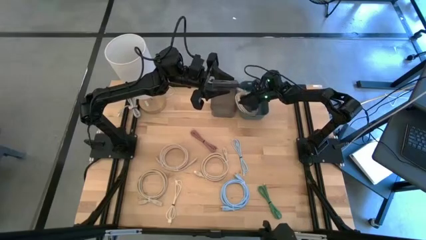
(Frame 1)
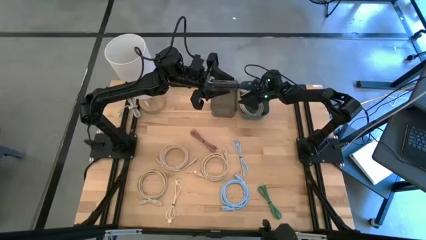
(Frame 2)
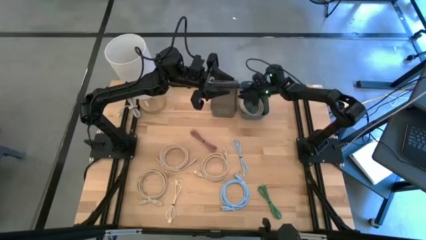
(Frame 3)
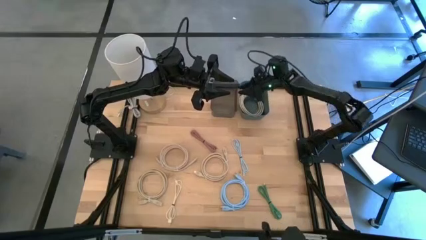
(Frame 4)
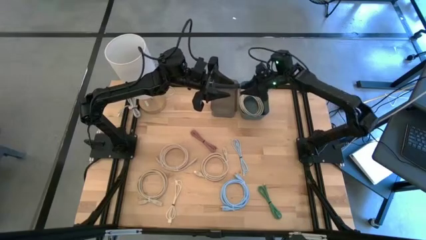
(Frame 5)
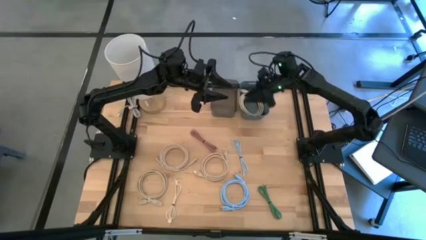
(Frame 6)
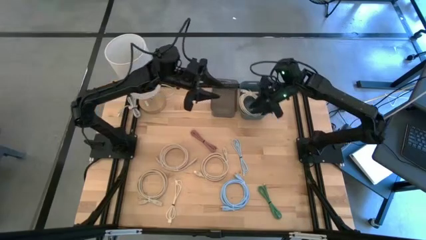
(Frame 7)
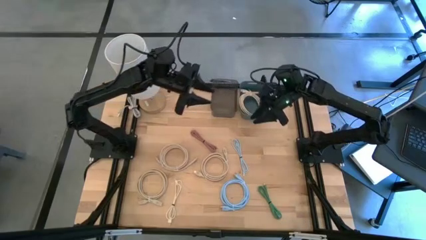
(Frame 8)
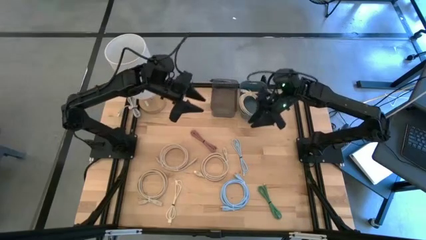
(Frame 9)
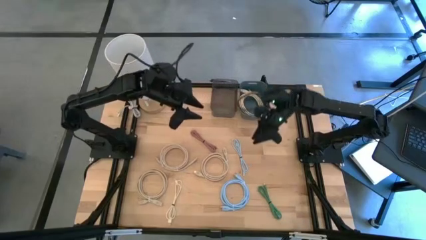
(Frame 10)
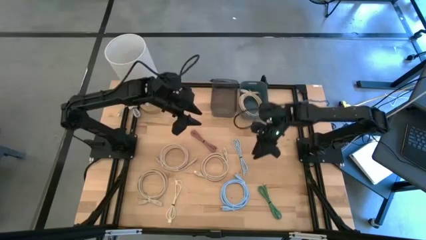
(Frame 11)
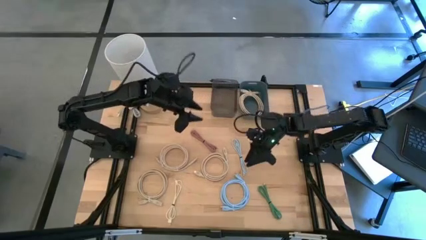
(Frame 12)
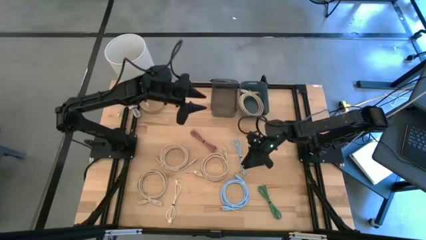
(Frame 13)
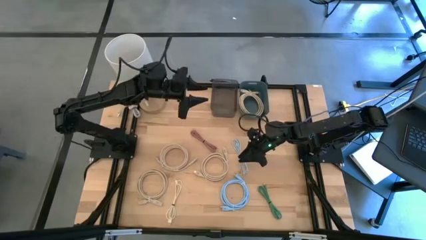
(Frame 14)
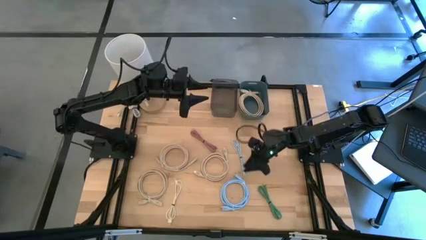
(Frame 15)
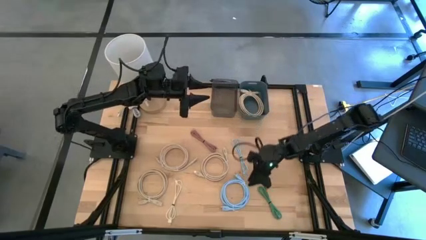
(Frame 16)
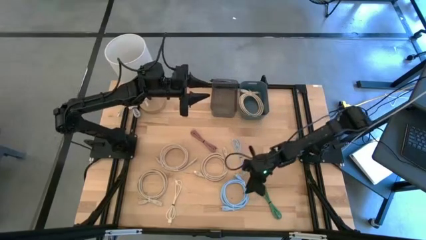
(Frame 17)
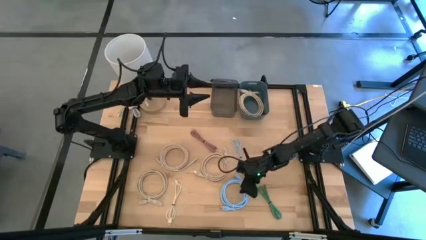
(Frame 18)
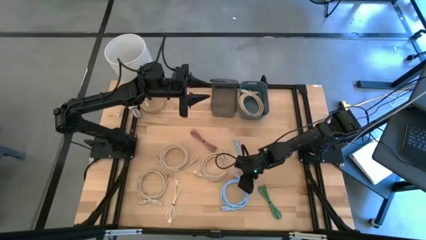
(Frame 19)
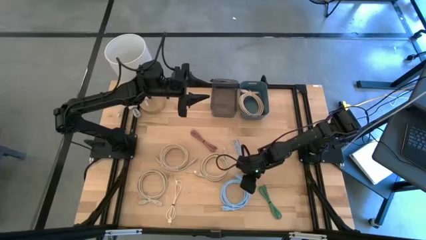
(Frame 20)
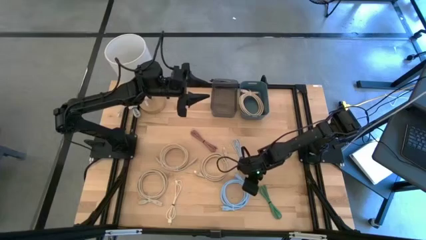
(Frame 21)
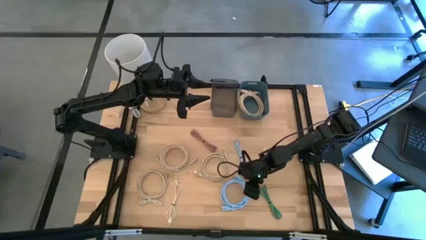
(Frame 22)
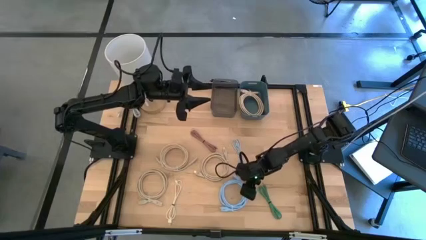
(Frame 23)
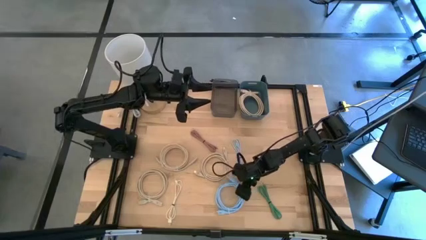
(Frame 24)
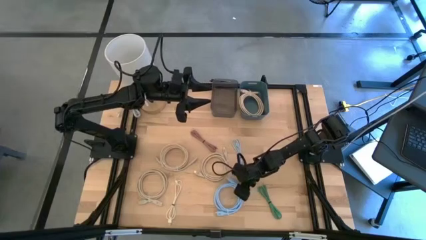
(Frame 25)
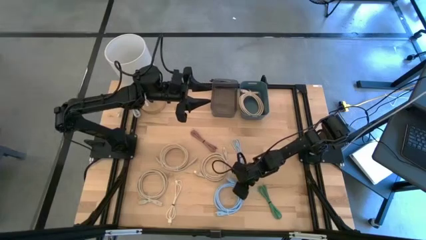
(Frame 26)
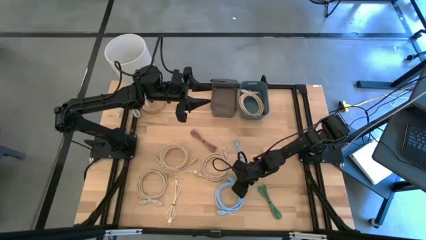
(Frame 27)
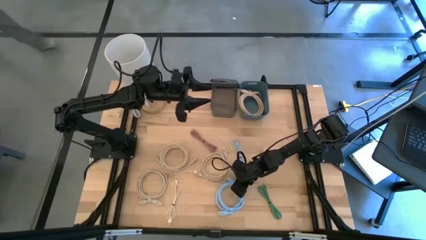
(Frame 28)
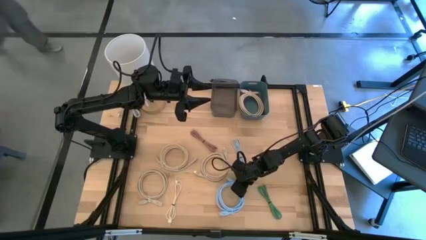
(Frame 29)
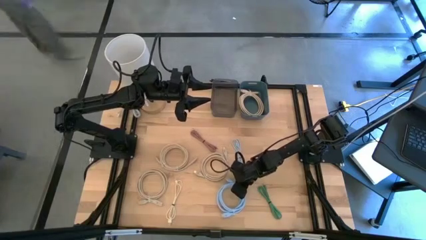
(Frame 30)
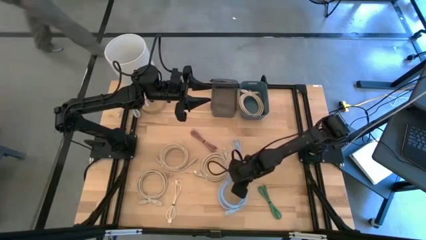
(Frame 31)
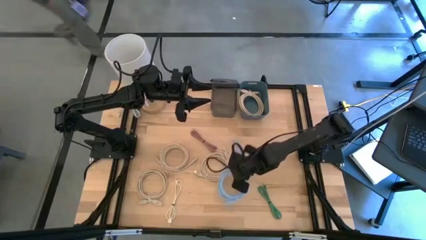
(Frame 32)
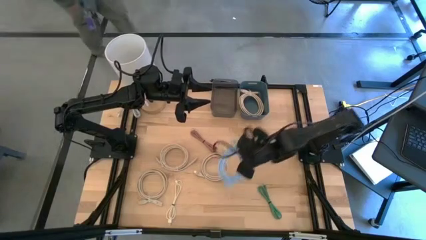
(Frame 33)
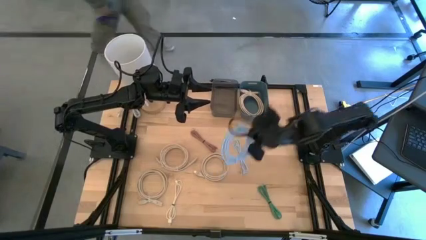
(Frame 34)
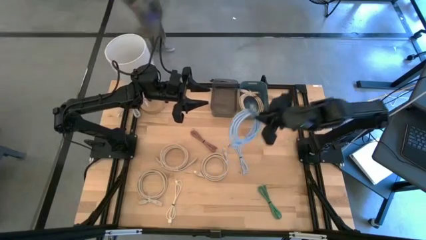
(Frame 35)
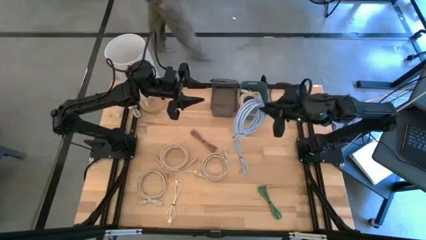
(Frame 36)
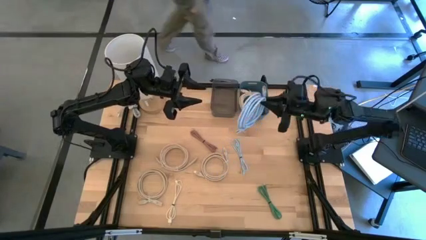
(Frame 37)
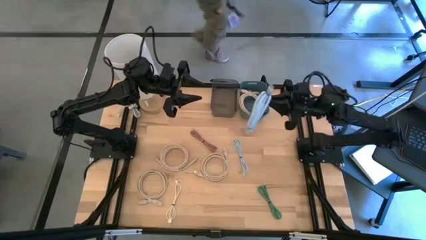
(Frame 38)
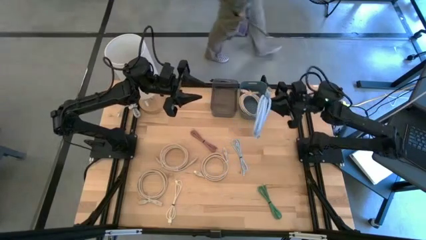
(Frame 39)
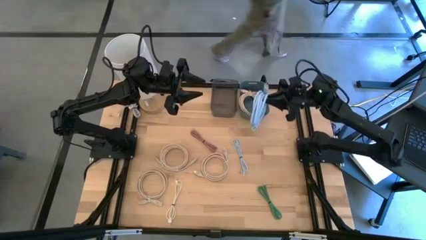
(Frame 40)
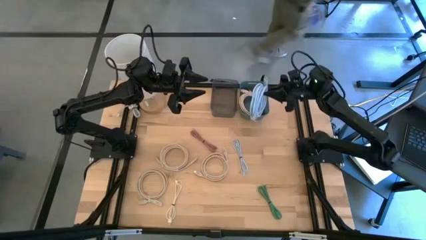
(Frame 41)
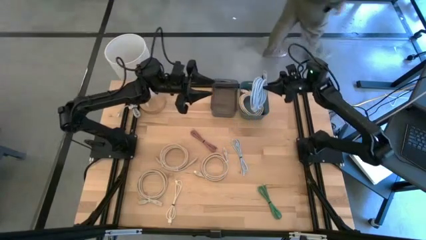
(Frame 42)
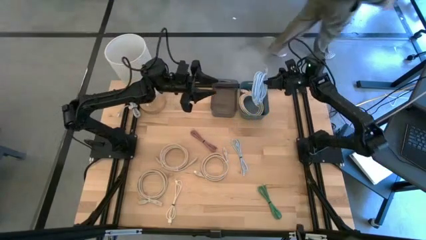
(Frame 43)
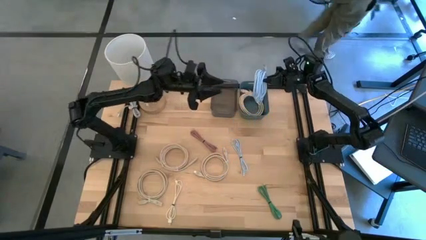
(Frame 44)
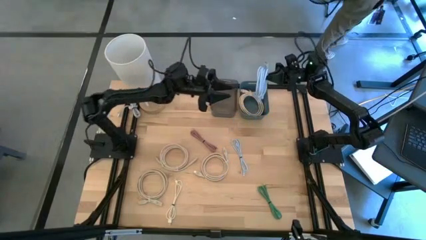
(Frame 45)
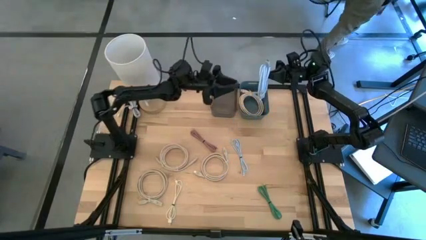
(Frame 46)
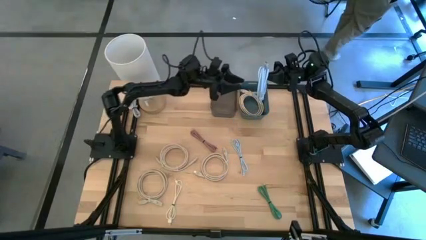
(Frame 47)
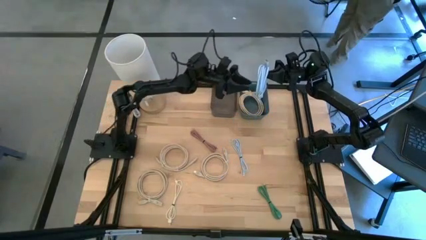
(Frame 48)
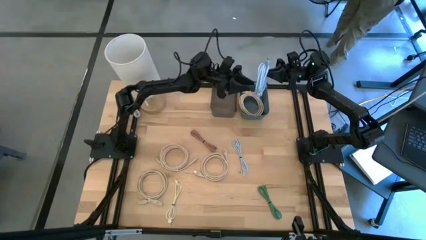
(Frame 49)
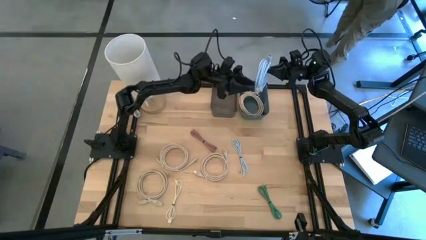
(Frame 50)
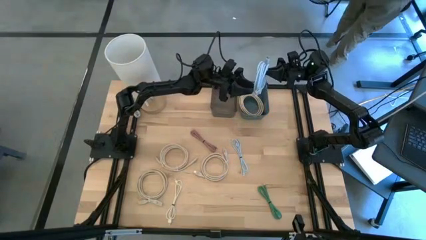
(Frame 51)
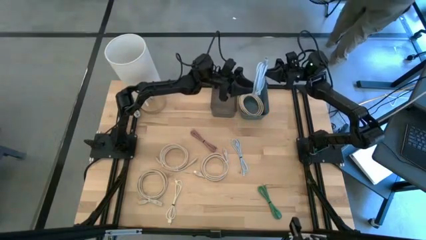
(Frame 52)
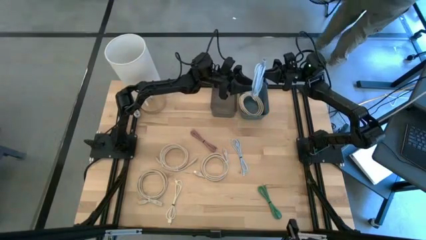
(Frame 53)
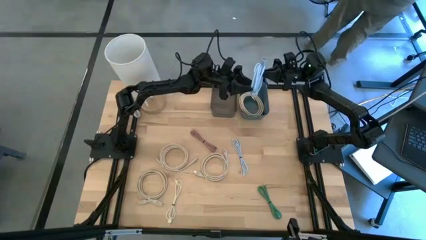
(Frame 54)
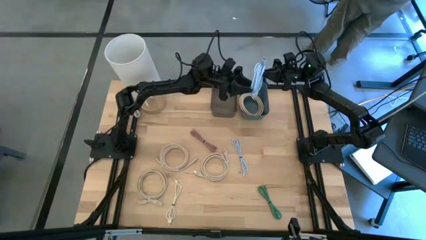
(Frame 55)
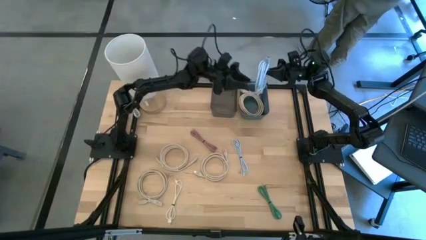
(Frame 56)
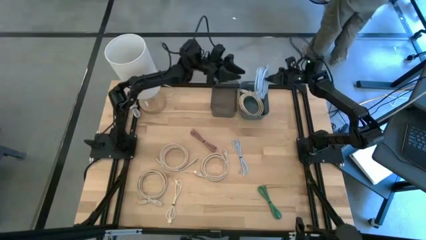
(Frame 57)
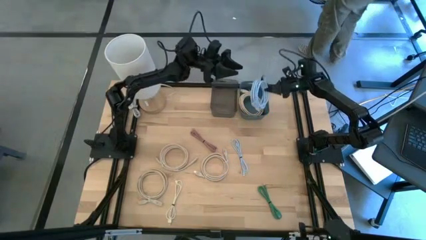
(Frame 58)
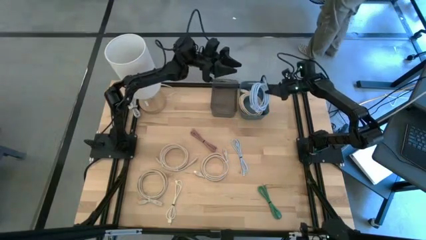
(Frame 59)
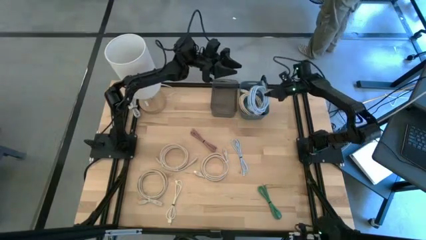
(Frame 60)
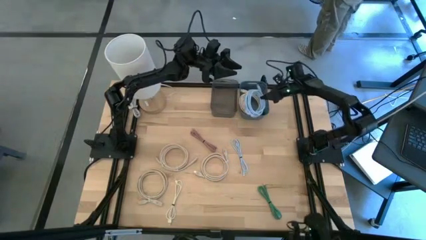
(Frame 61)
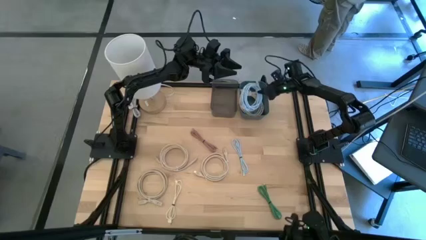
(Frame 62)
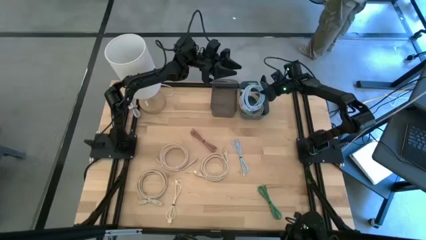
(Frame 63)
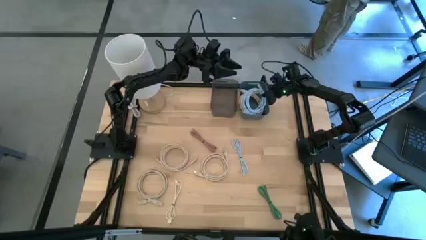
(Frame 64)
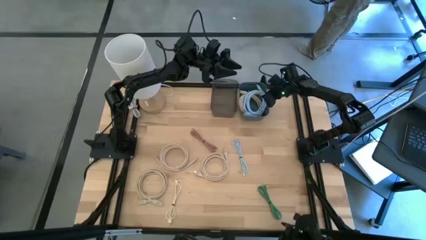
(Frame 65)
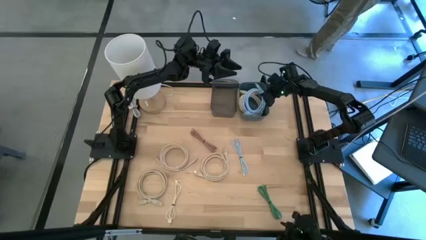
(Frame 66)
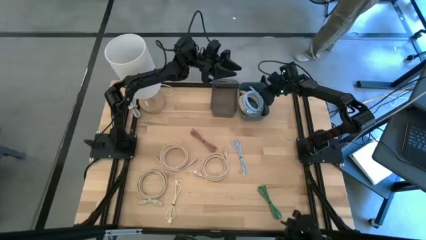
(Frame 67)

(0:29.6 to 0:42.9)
Put the blue HDMI cable into the blue bin
